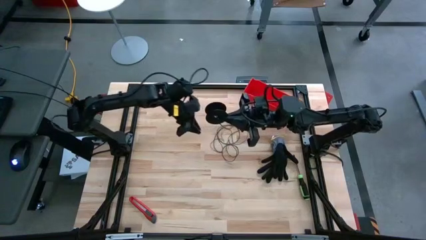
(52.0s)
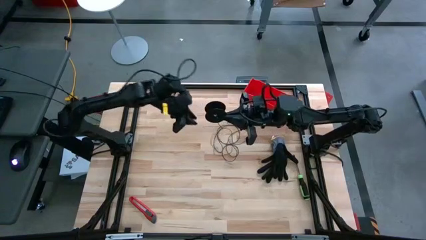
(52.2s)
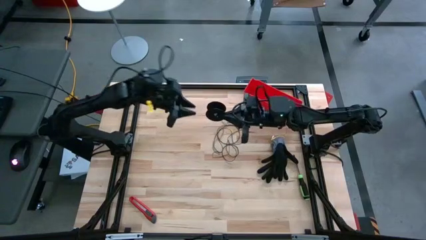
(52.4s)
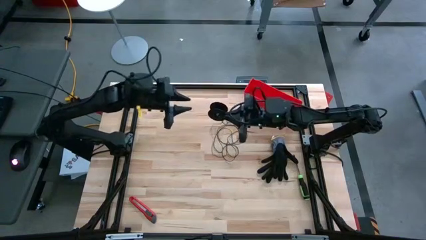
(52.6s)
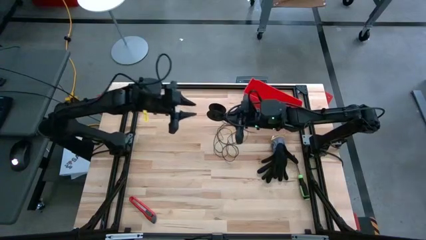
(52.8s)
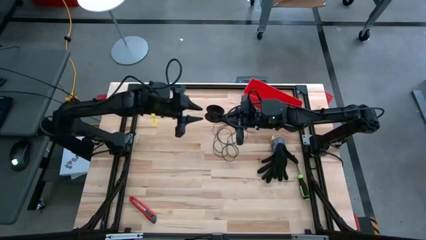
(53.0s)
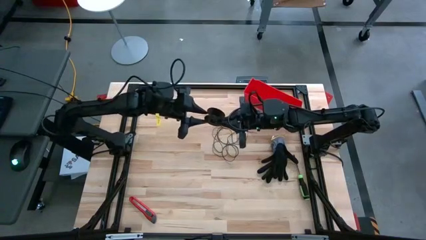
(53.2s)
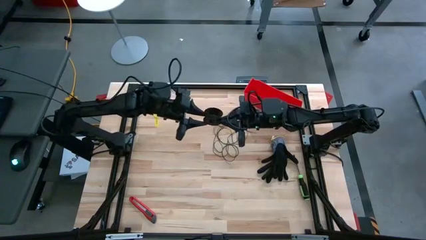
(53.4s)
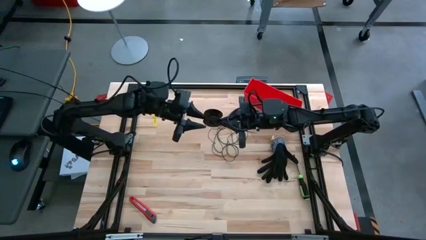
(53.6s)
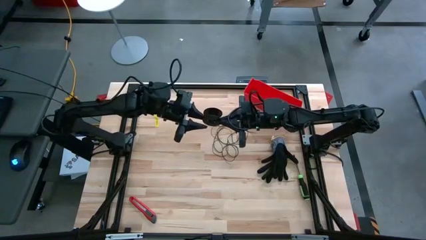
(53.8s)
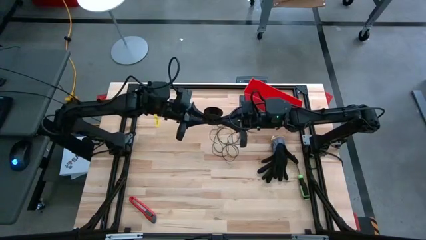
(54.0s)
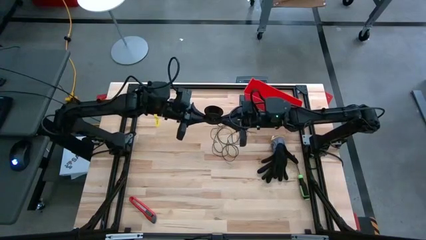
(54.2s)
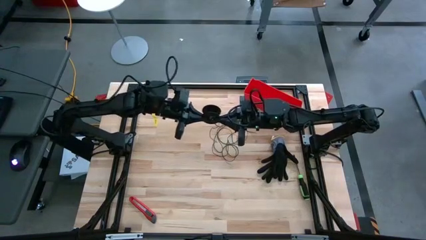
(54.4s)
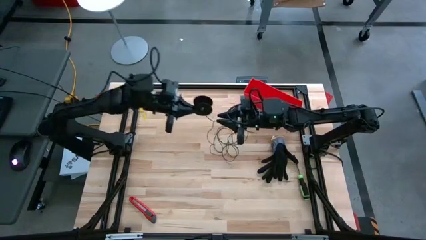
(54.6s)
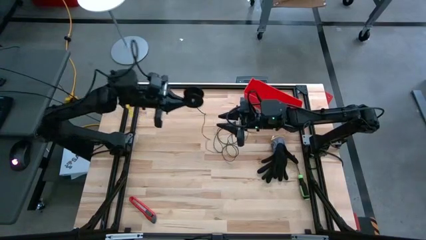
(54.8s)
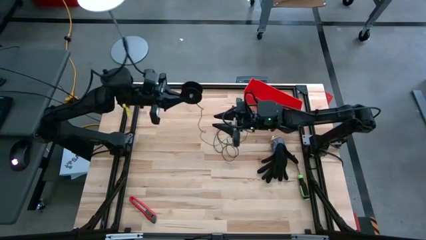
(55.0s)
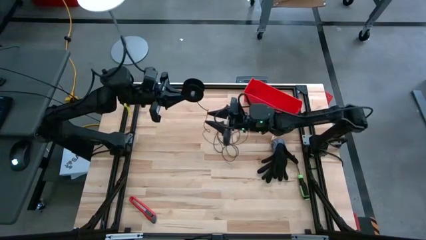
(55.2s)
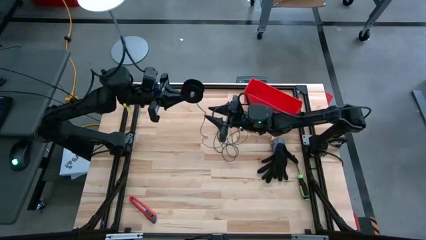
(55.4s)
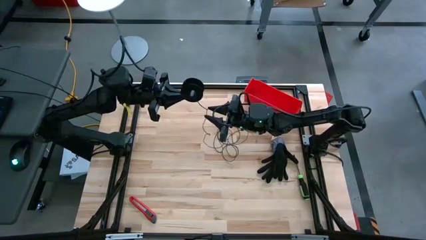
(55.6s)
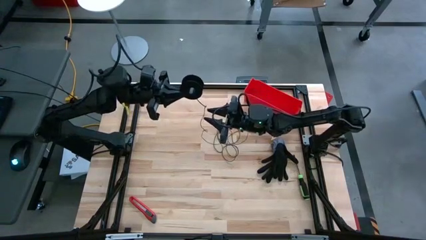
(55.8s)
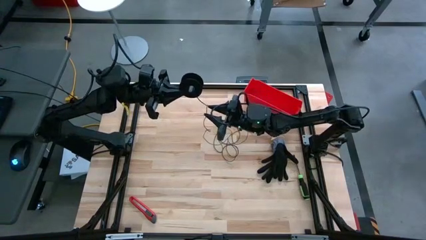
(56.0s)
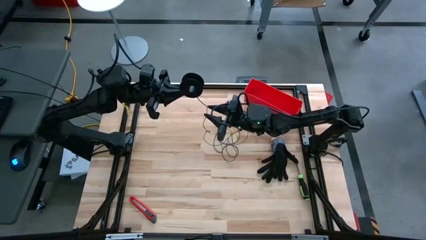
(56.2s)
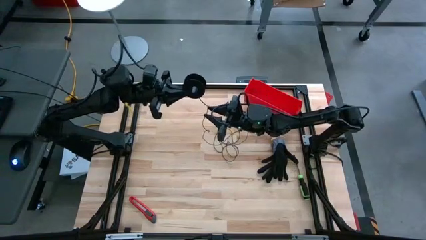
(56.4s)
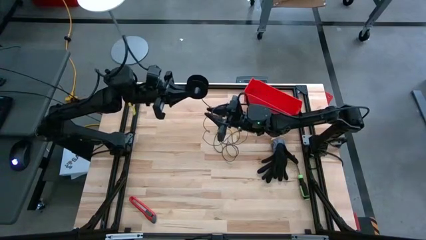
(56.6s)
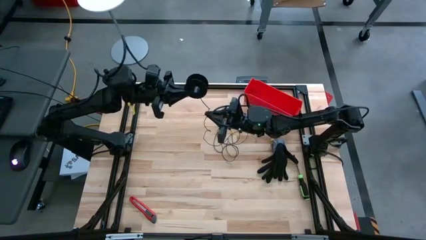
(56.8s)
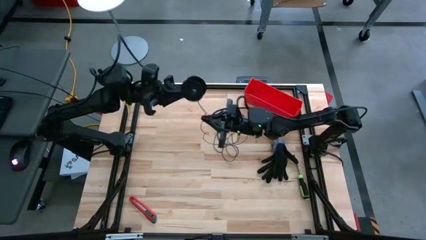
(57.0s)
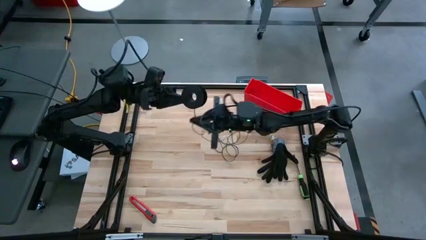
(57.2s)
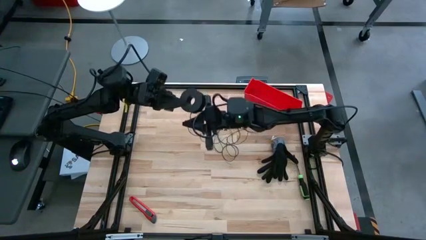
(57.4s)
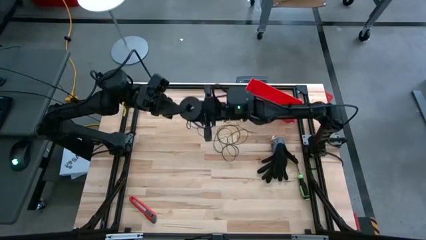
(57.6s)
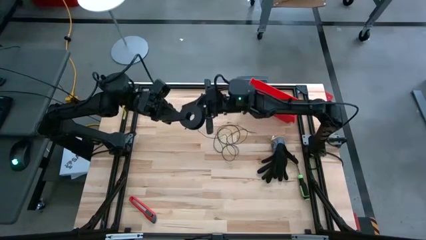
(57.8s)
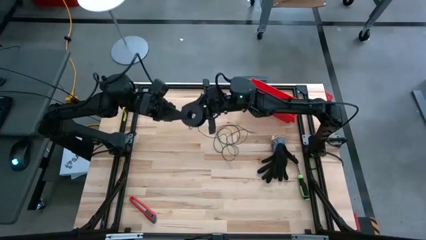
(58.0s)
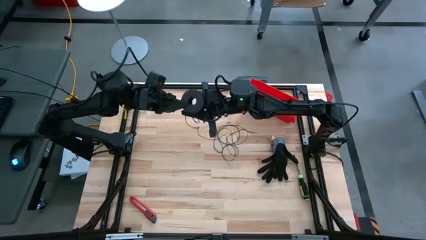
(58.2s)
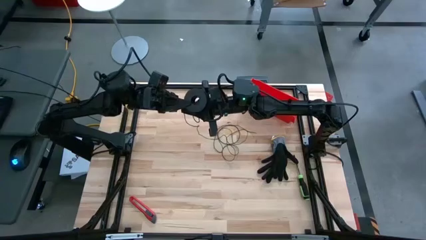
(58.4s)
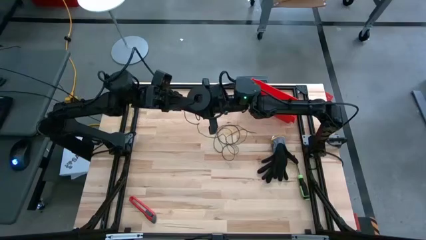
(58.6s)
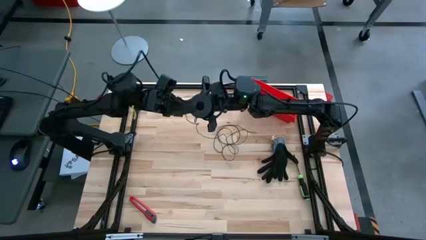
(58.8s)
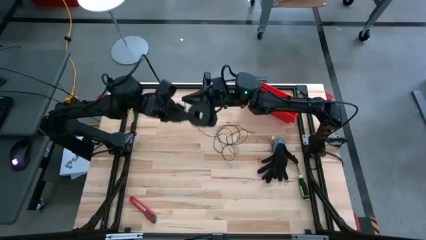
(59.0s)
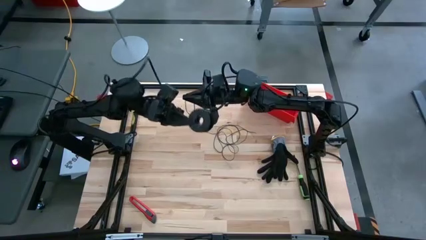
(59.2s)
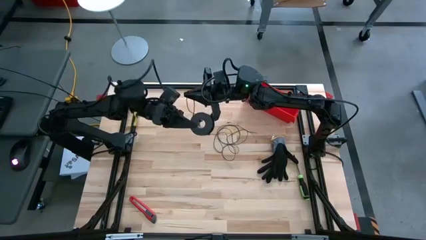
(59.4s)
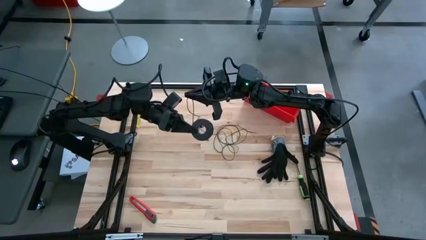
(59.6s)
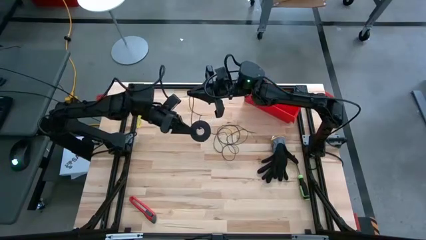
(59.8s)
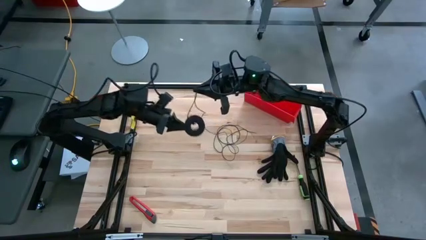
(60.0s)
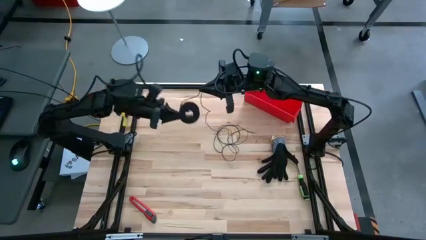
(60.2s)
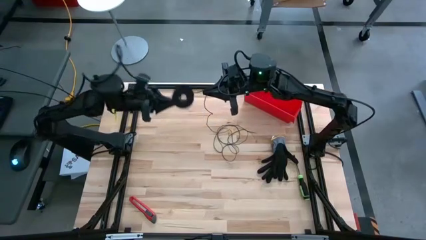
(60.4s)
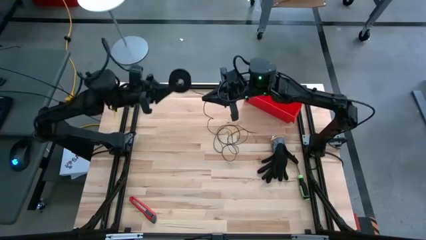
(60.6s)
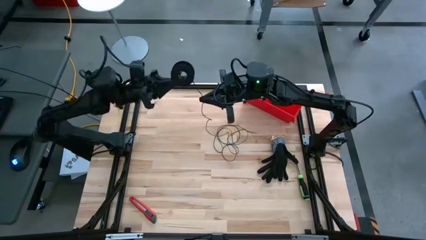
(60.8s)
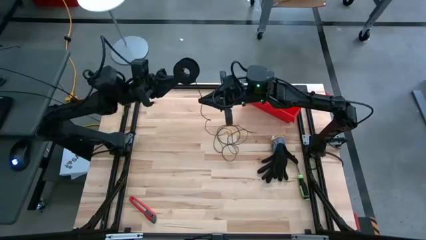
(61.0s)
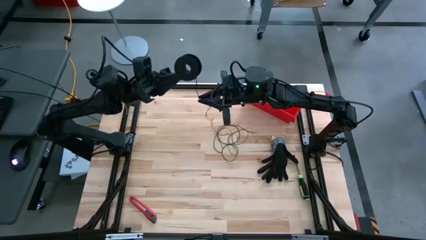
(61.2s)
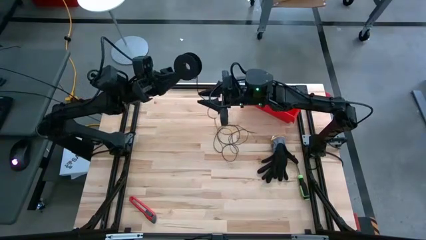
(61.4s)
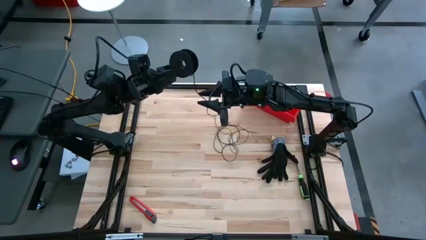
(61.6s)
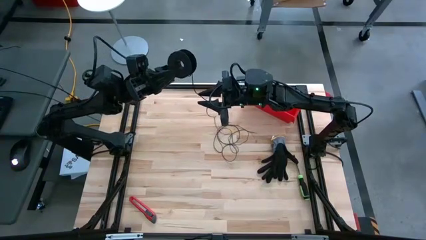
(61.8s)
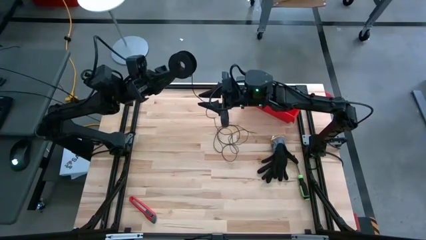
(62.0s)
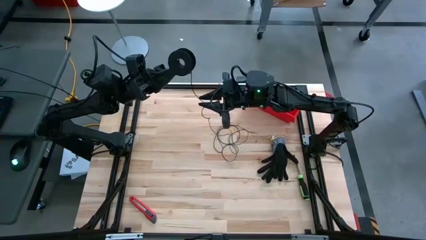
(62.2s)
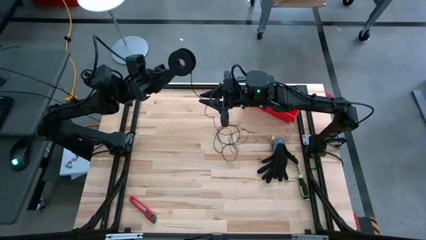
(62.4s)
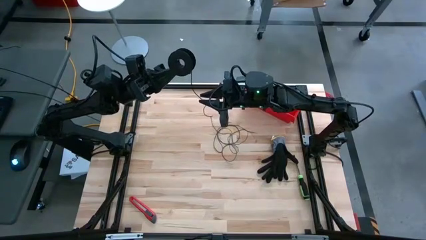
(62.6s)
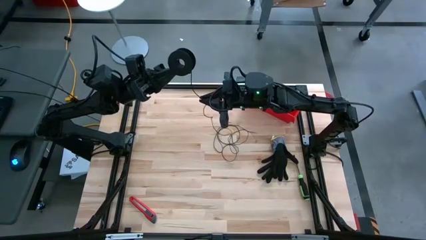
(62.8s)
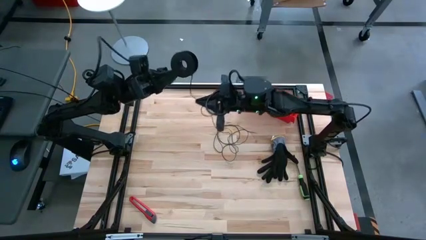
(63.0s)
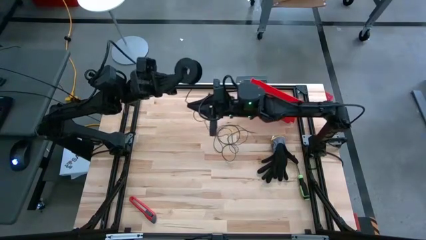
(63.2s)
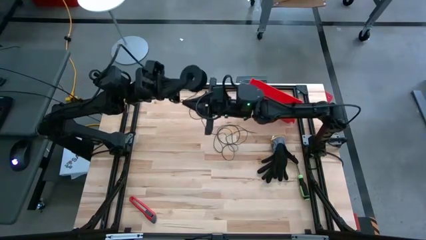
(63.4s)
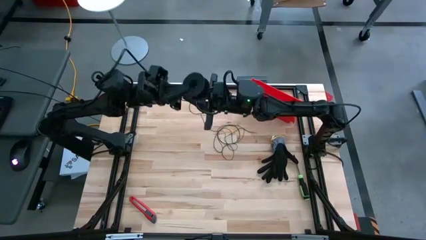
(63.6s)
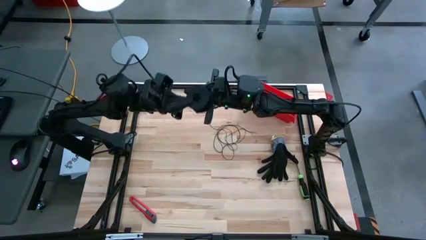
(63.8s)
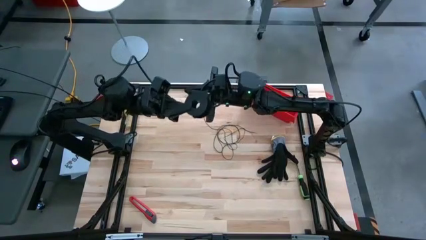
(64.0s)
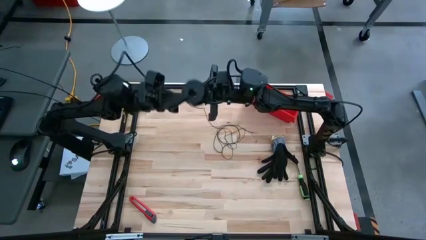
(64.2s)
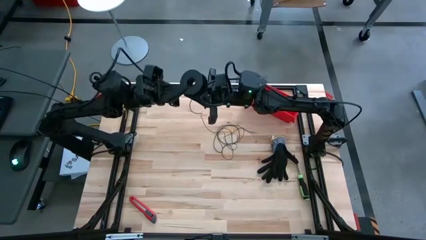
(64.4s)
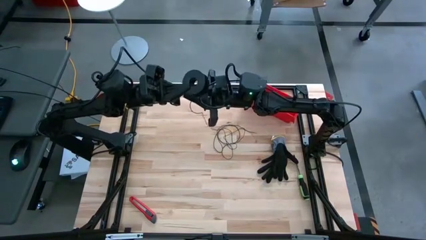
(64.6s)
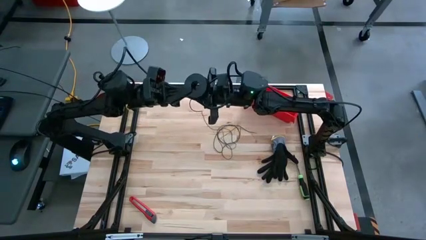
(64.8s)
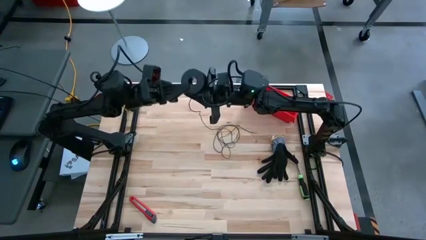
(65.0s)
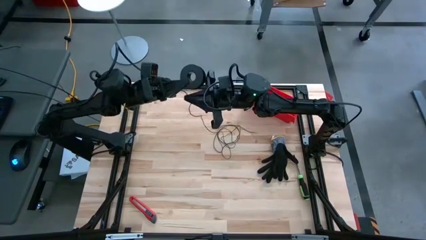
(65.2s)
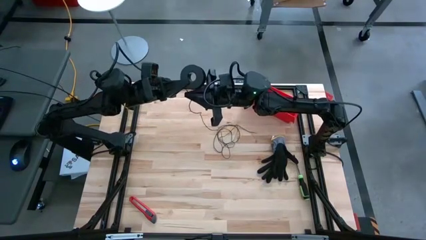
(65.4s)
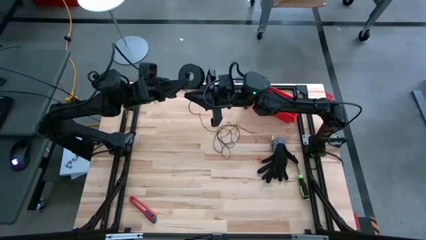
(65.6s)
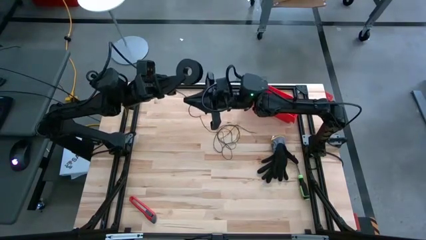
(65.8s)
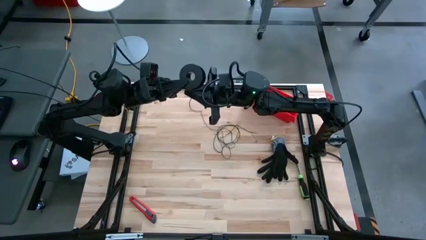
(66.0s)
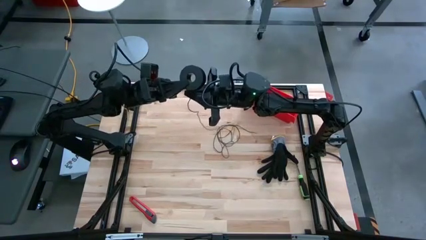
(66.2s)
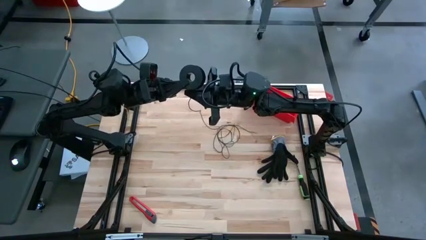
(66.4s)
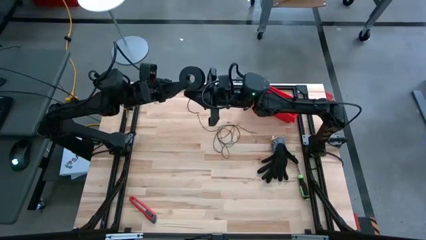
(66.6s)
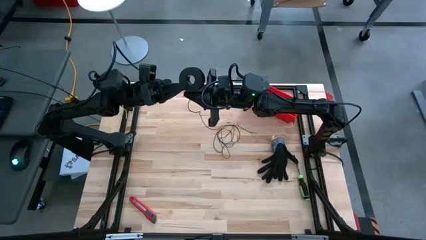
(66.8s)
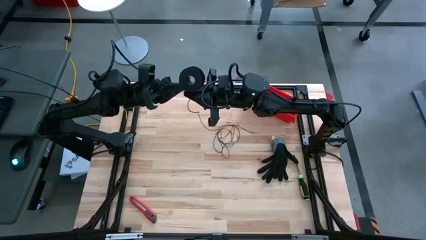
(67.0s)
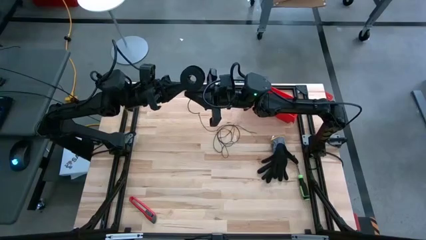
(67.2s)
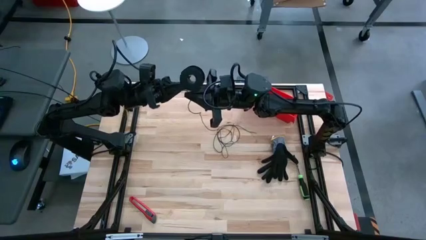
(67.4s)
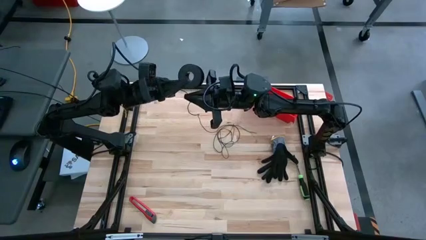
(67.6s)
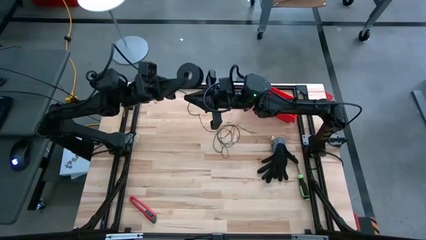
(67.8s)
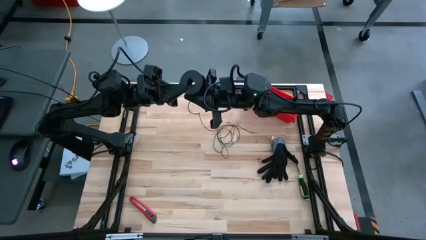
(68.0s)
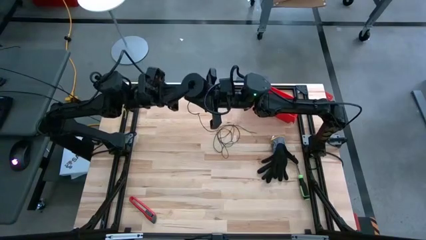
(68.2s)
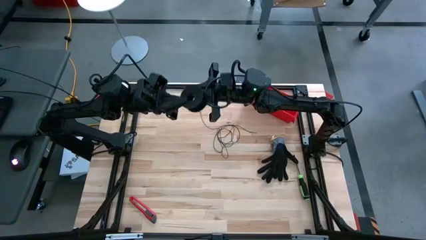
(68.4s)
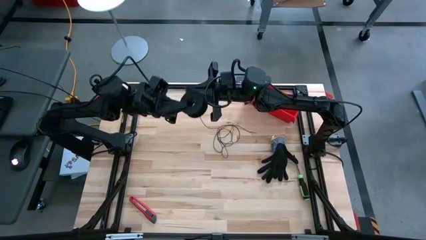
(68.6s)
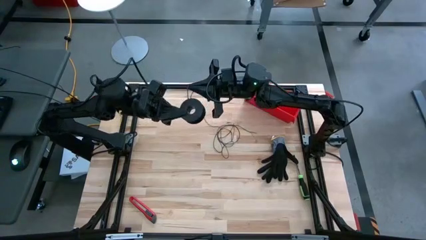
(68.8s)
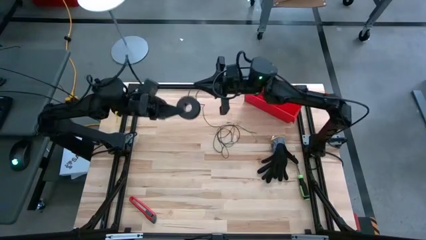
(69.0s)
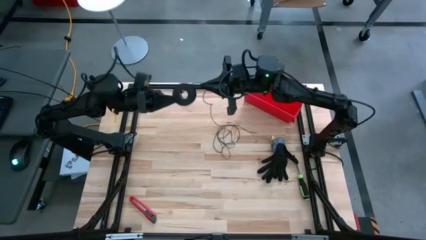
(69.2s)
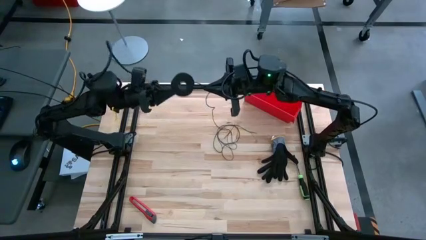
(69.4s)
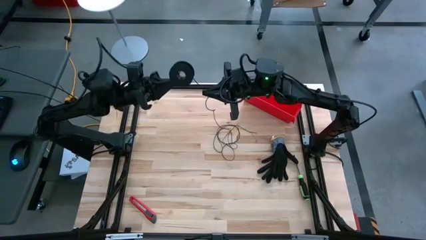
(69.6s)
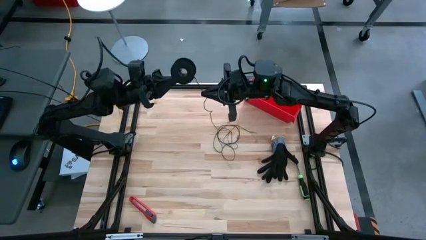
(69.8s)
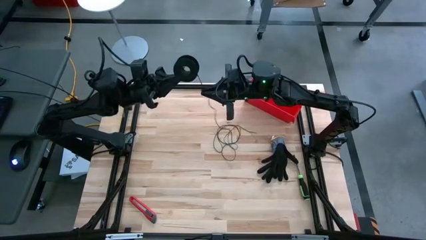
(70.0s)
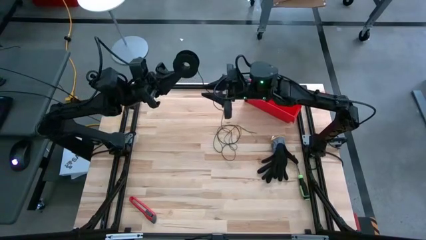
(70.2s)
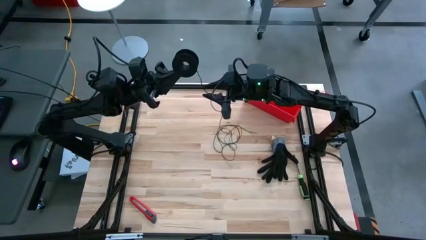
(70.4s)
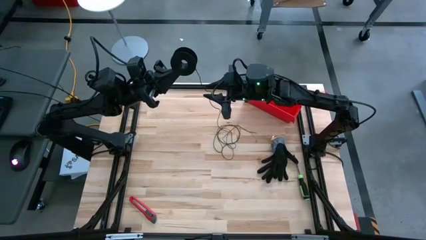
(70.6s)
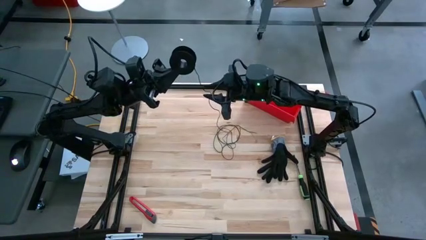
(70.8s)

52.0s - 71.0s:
Task: Coil cords
Coil the black wire on the spool
